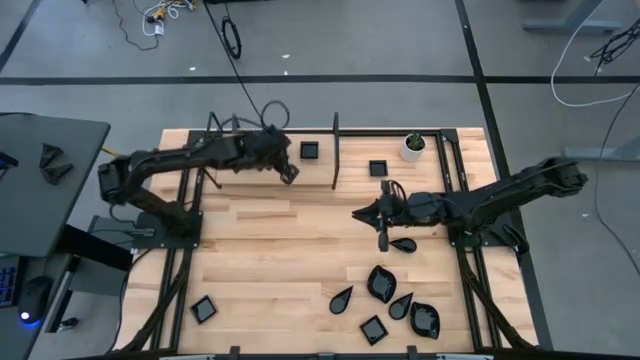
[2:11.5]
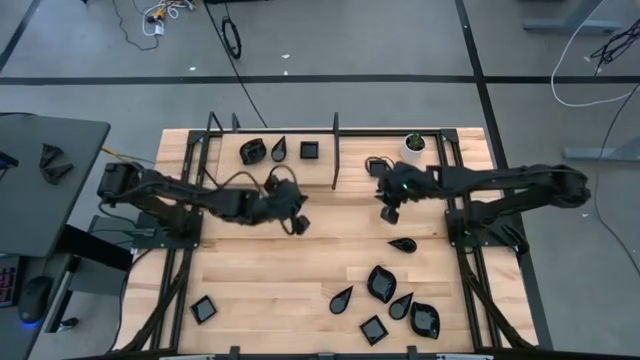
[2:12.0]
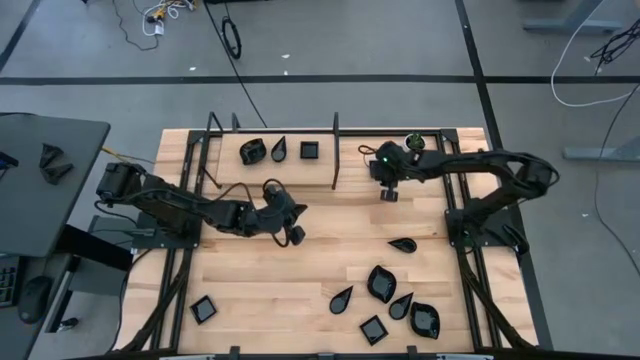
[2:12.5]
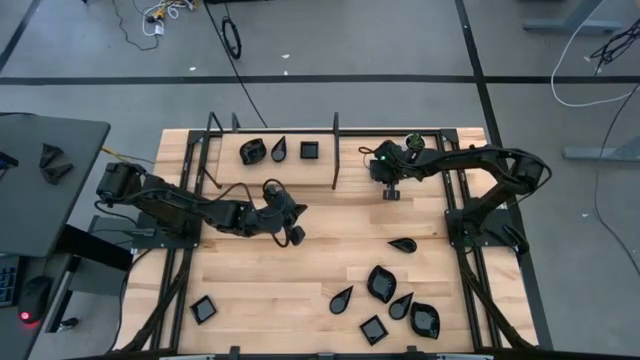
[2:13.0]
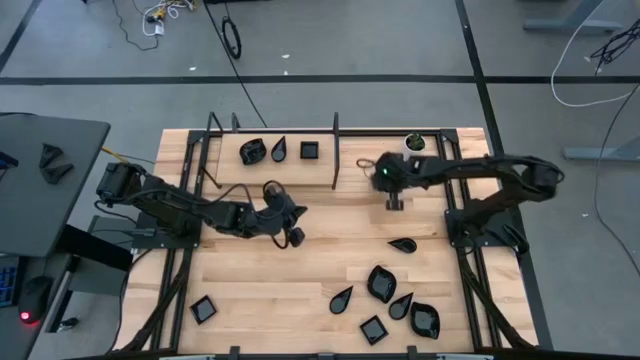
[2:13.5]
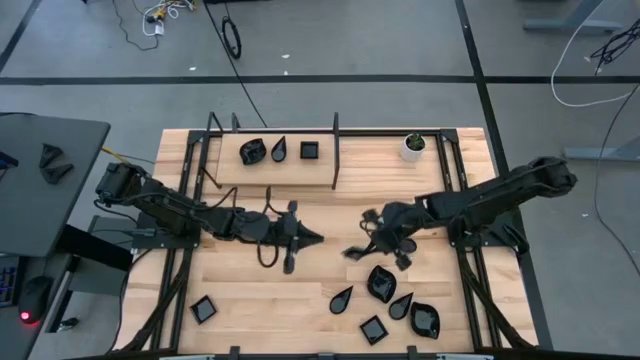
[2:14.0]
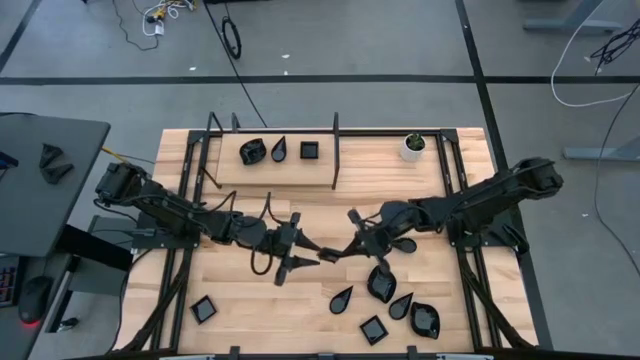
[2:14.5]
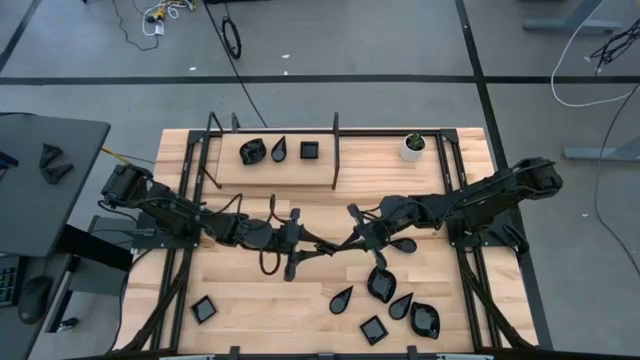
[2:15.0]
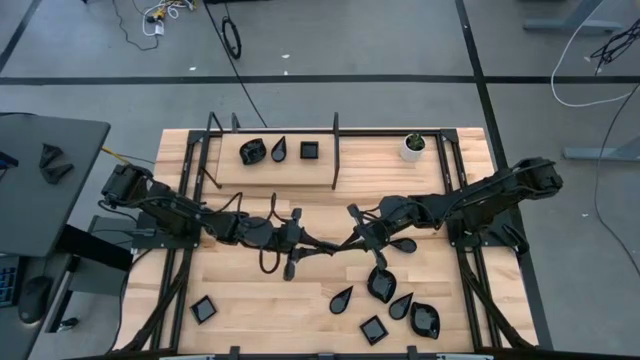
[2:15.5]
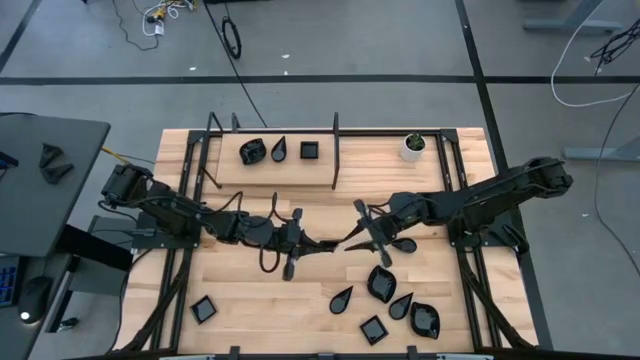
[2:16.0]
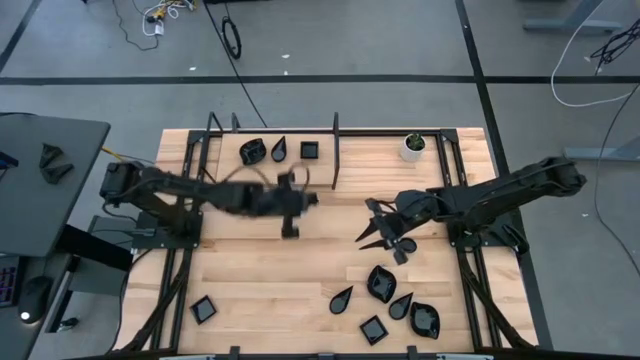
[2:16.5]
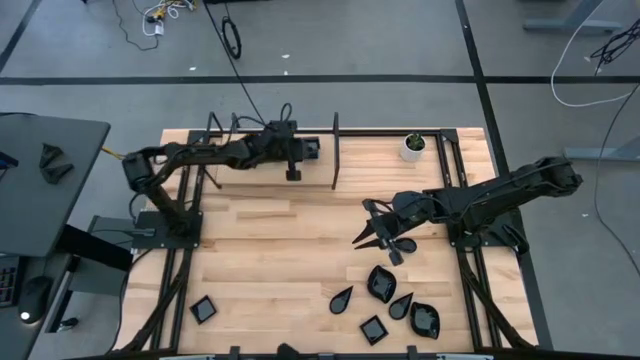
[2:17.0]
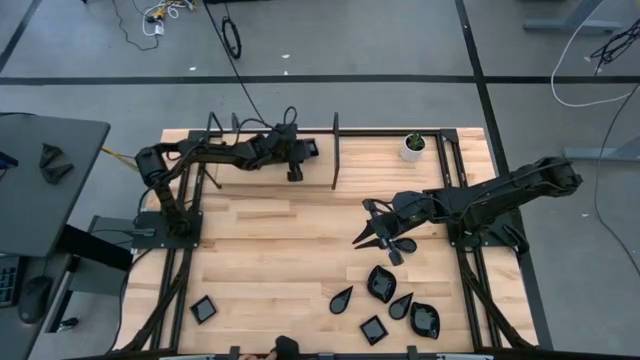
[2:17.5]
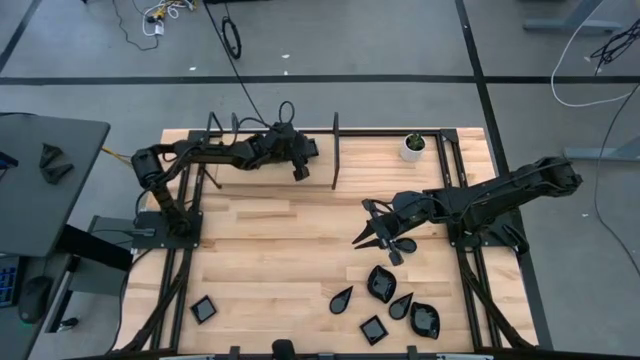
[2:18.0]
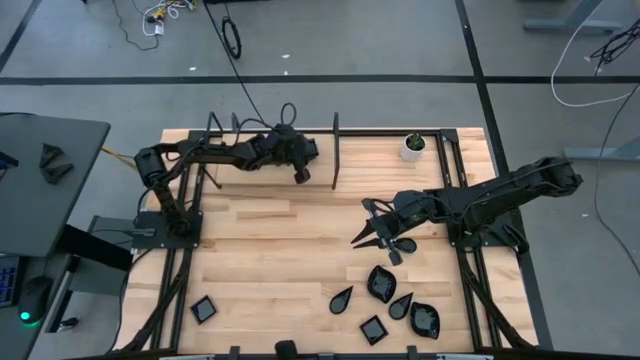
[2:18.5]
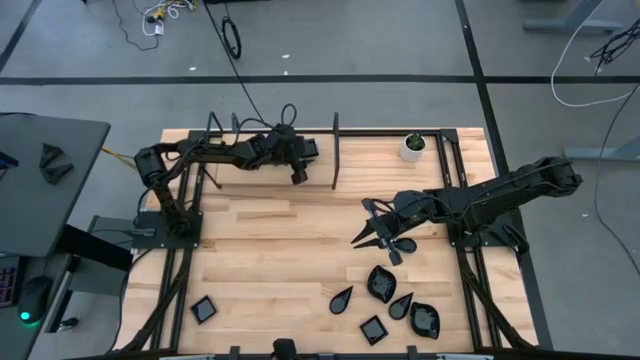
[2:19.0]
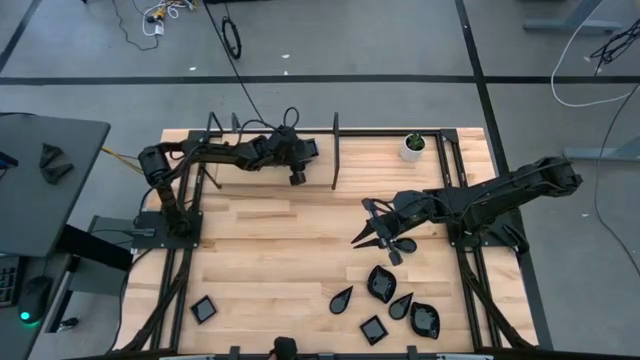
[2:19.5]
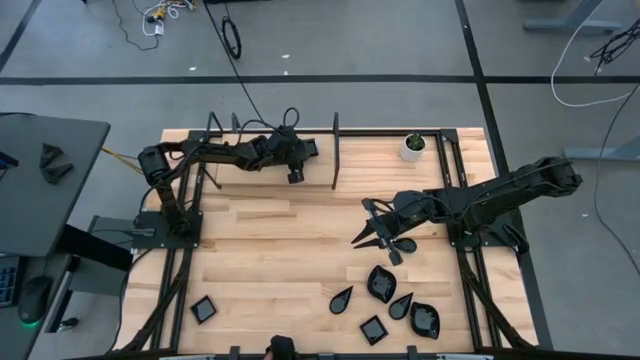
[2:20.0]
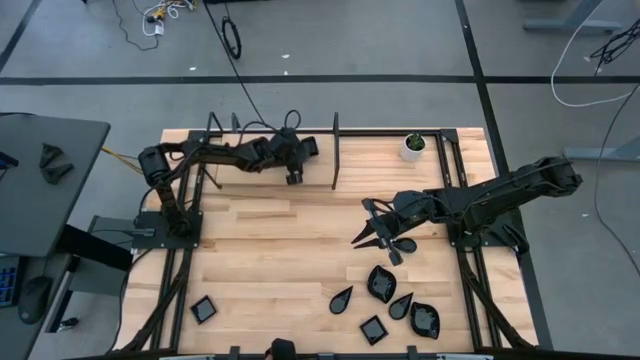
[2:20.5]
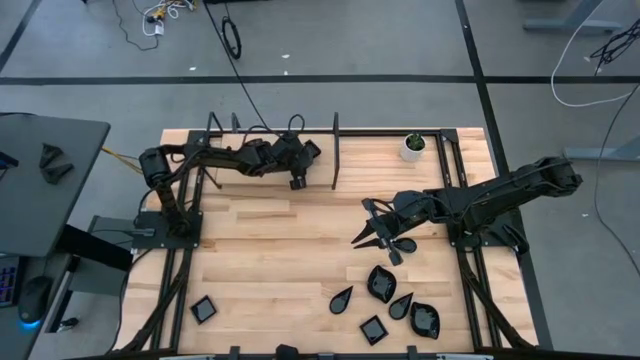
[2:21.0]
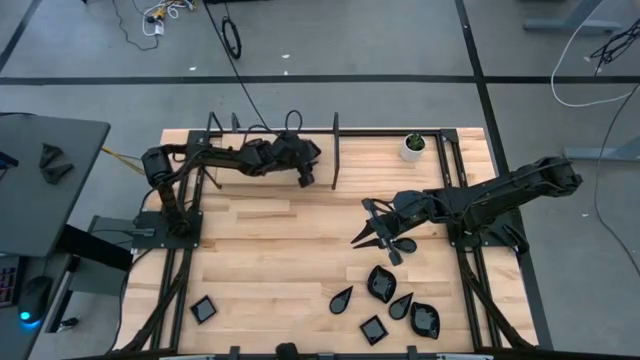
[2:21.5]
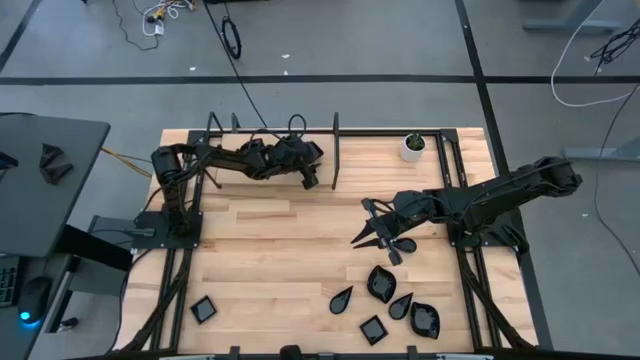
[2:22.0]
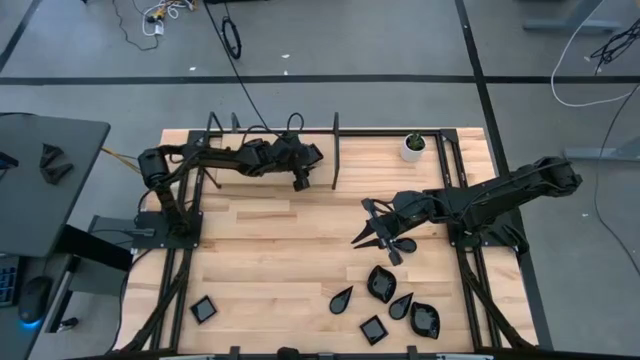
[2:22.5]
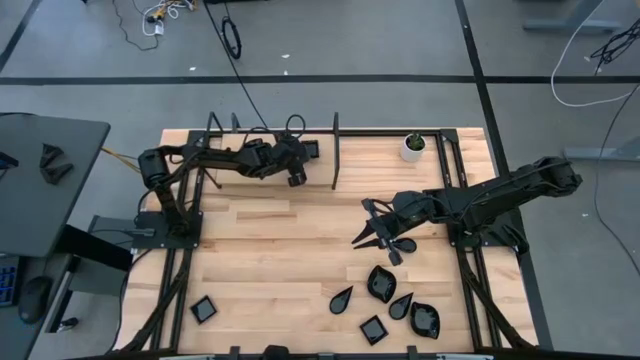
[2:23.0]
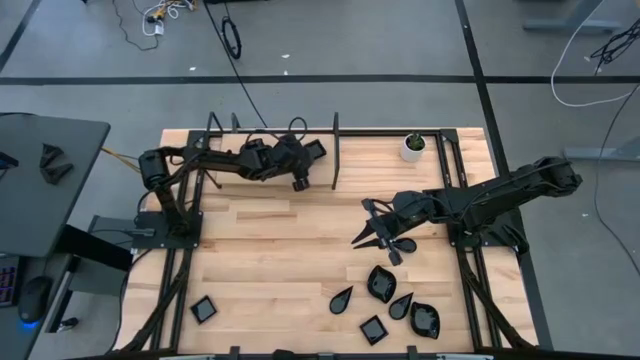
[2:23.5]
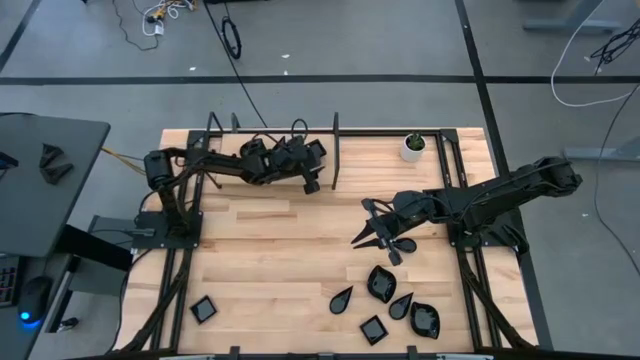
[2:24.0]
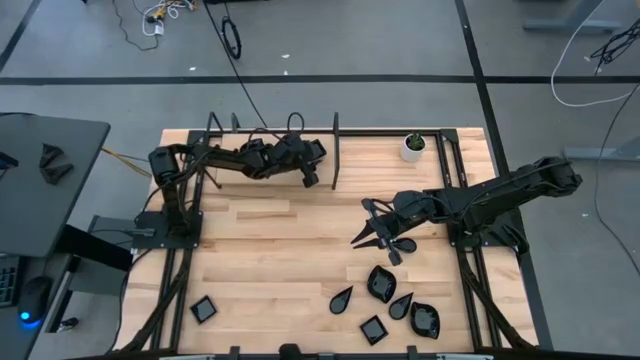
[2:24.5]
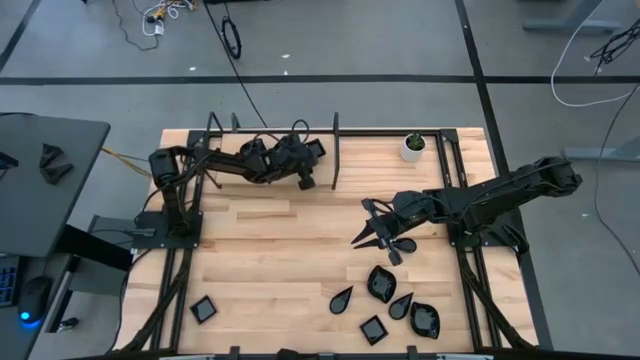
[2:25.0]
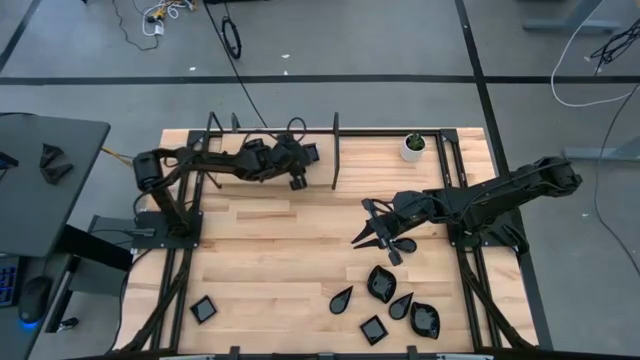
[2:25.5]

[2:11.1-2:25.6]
Task: Pick & Place Mini shaped plates
Stack the black square plate on top of the stacked black square plates on the shelf

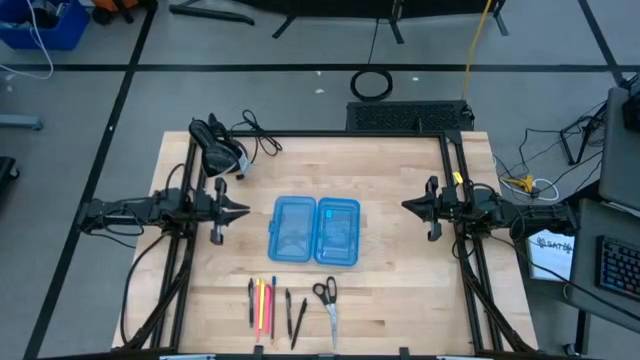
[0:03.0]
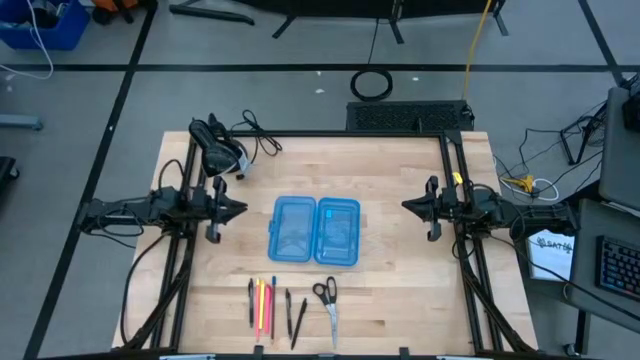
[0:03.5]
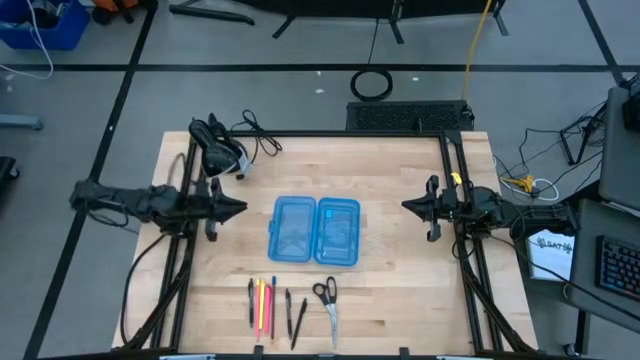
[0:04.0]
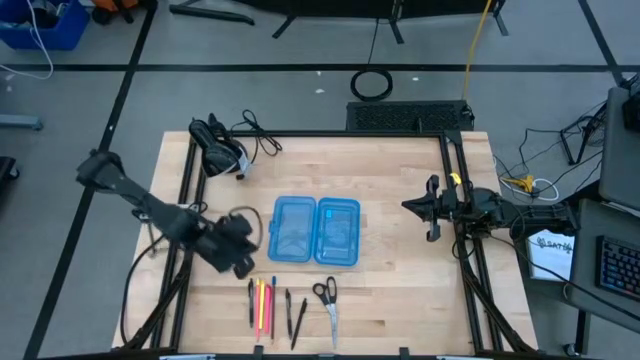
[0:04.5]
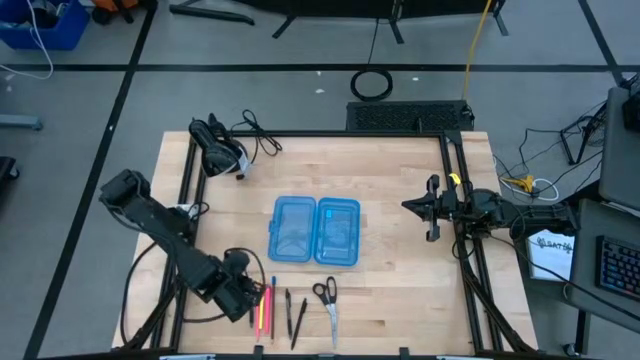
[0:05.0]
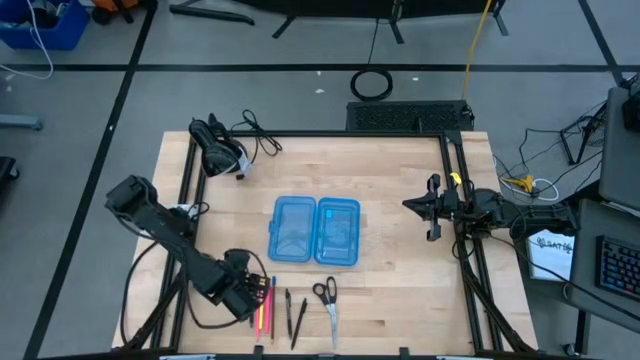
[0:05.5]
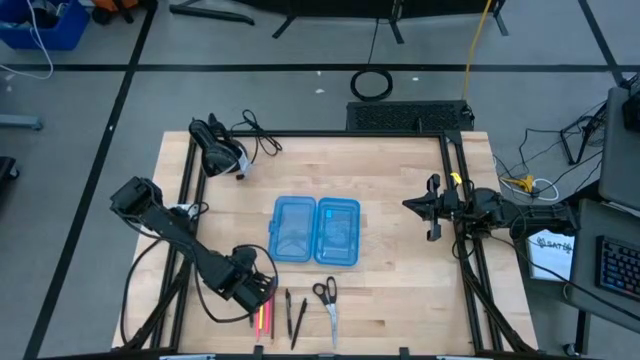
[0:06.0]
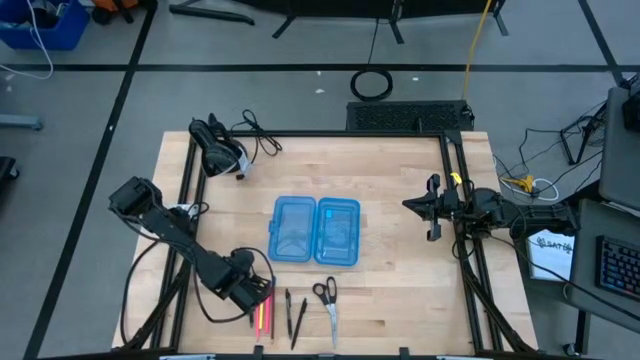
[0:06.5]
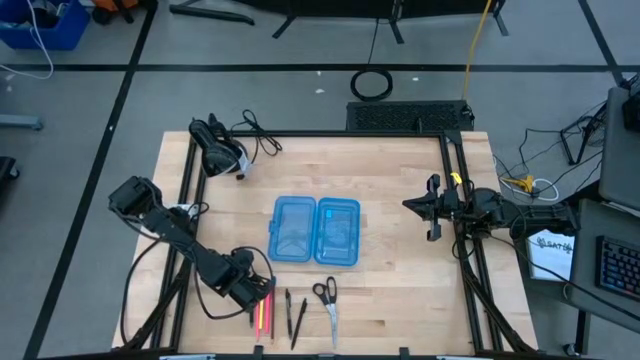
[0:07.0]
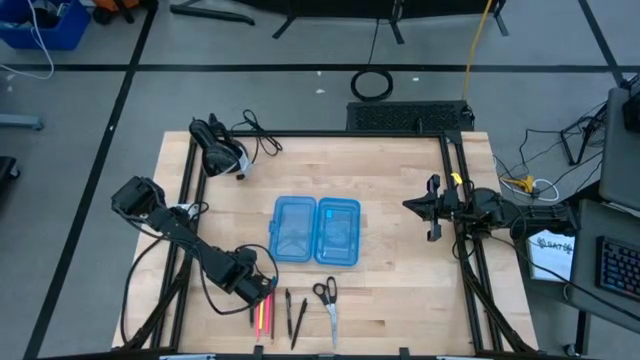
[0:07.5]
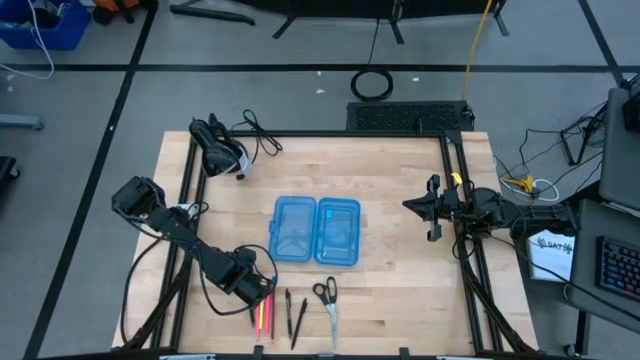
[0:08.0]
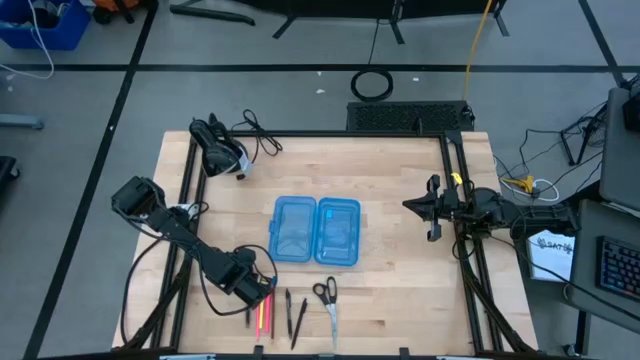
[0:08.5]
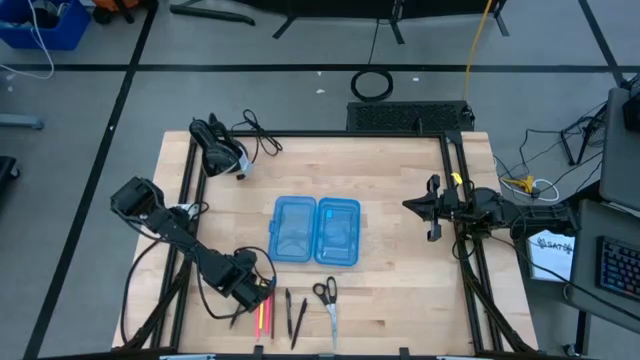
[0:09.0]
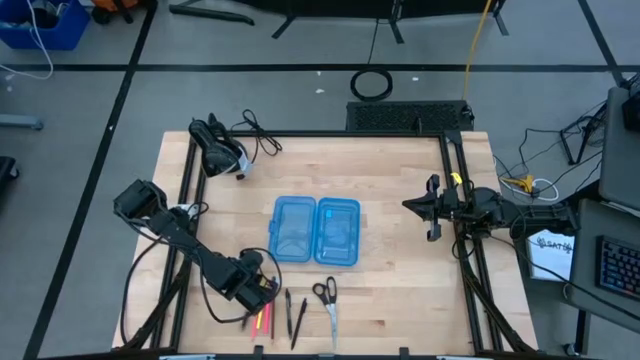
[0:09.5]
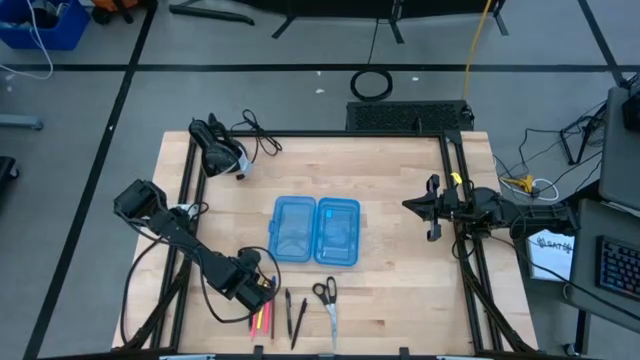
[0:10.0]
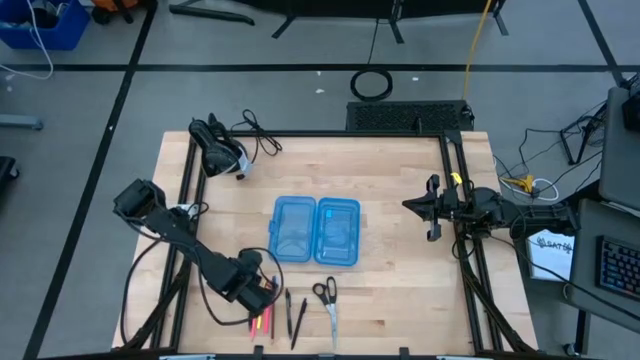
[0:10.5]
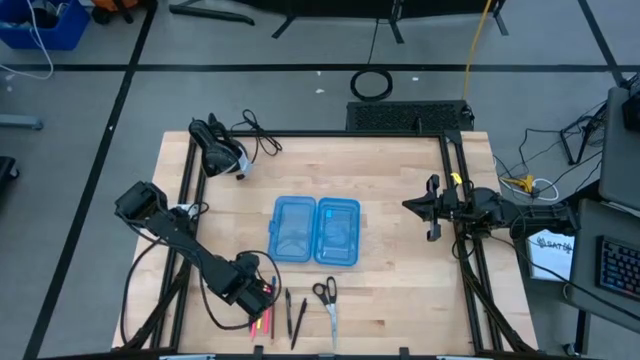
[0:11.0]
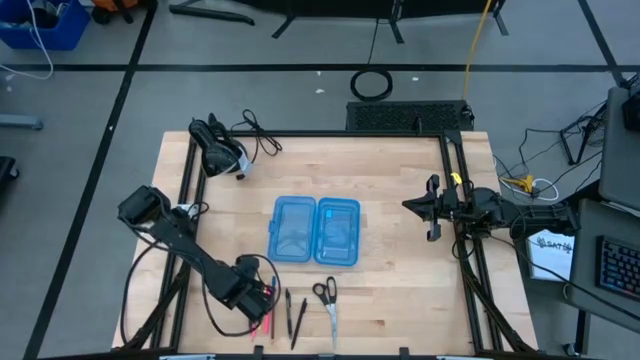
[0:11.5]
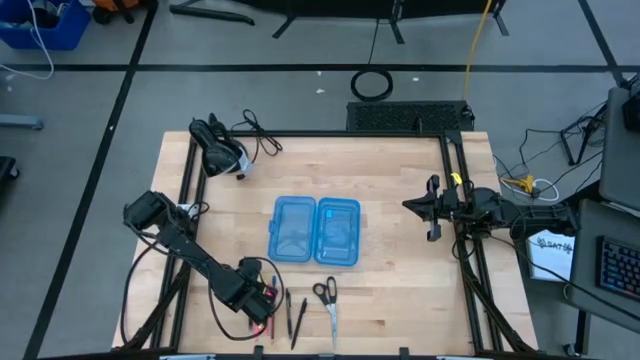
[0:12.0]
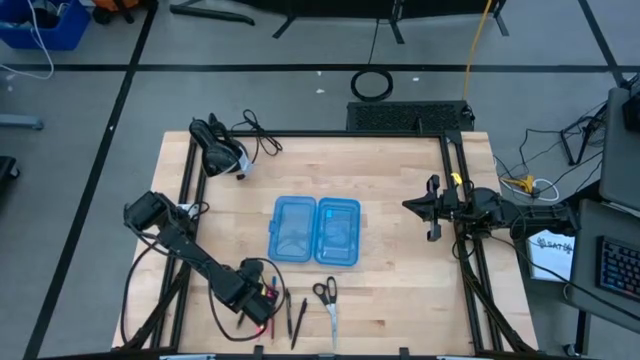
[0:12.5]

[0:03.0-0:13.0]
Task: Pick & place school supplies into a supply box
Put the left transparent black pen into the supply box
